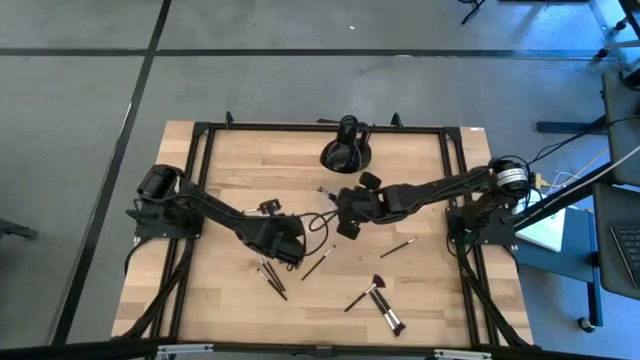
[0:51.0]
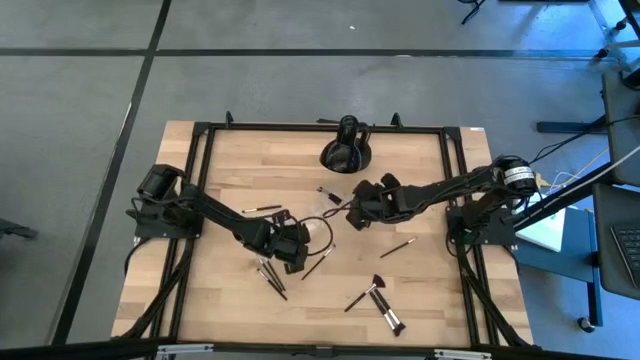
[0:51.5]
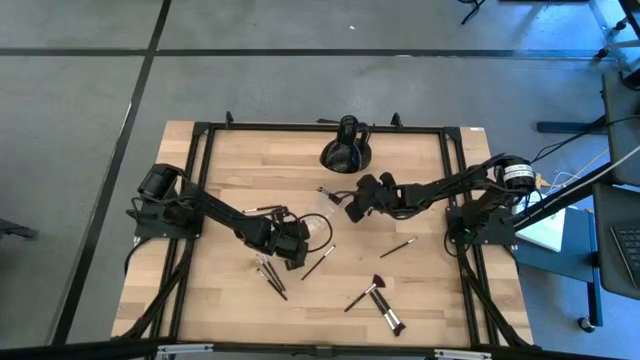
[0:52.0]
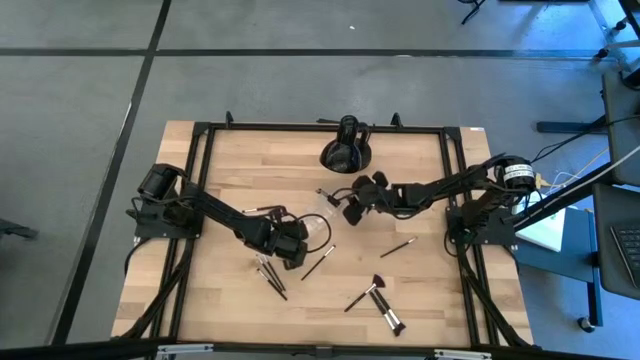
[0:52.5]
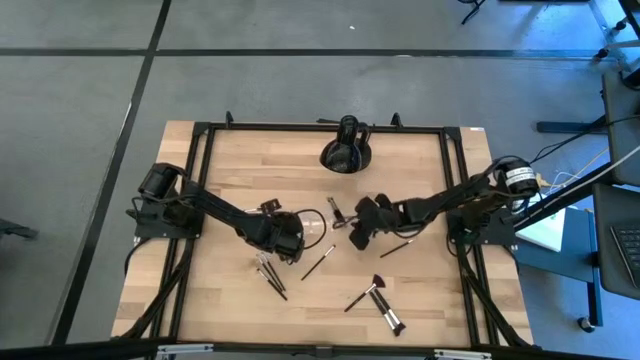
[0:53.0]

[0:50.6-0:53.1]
Task: Pick & Place Makeup Supplies
Adjust the transparent organizer

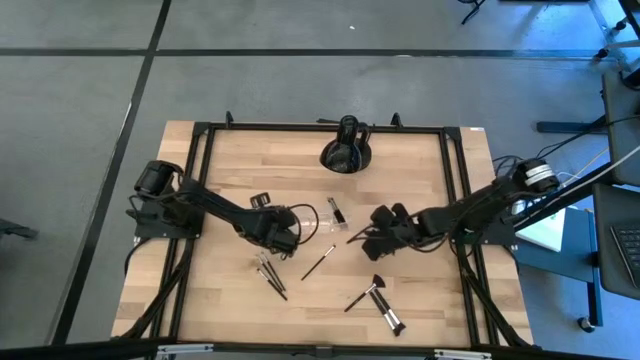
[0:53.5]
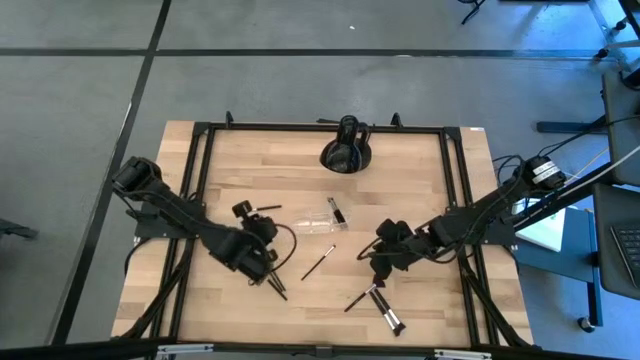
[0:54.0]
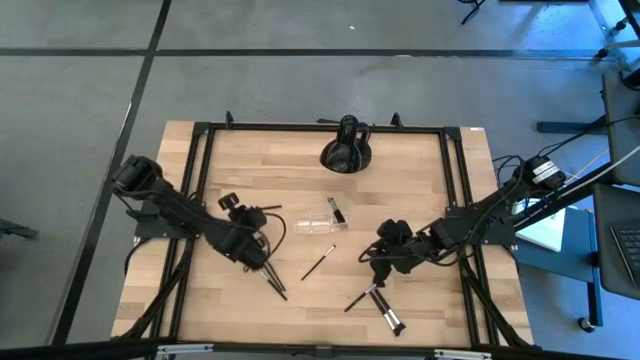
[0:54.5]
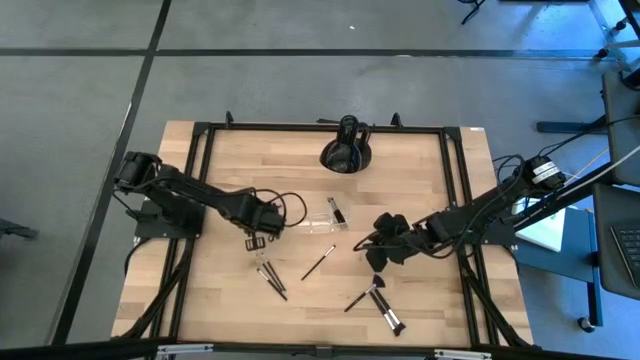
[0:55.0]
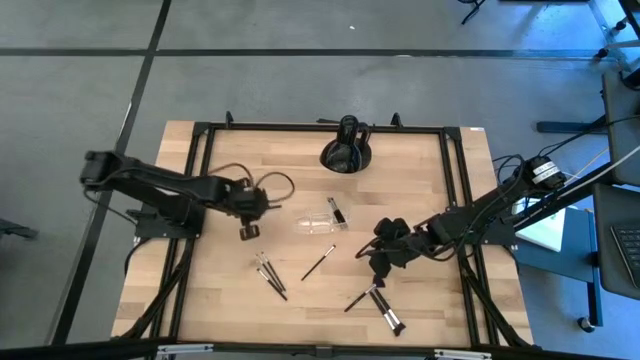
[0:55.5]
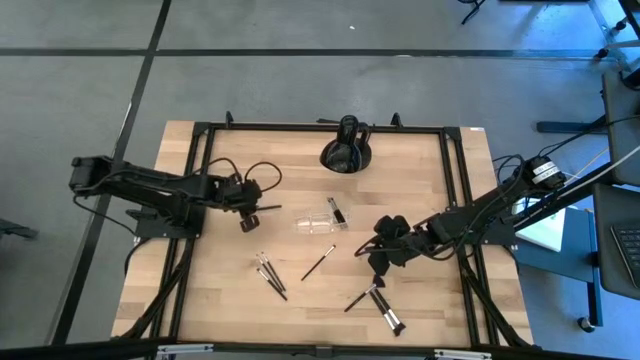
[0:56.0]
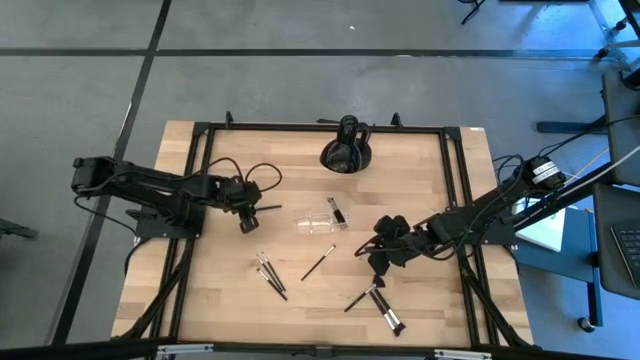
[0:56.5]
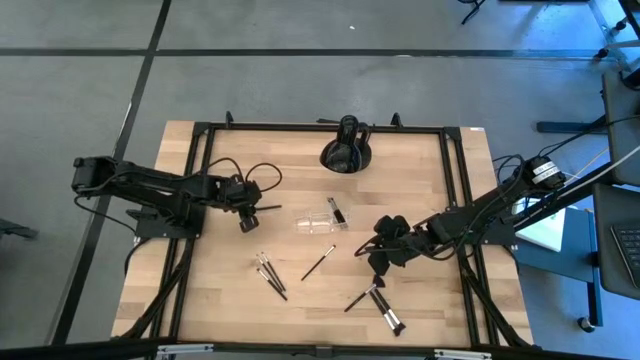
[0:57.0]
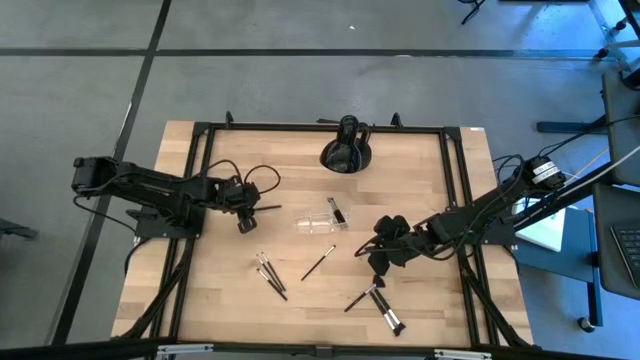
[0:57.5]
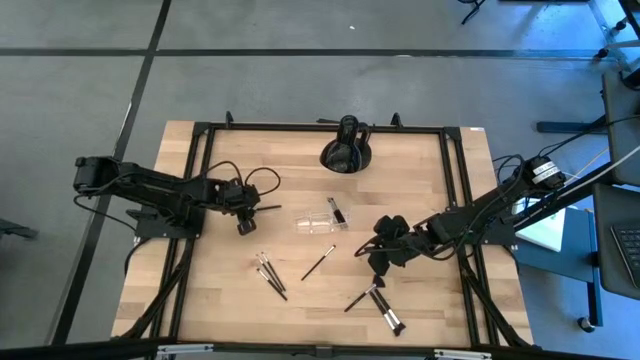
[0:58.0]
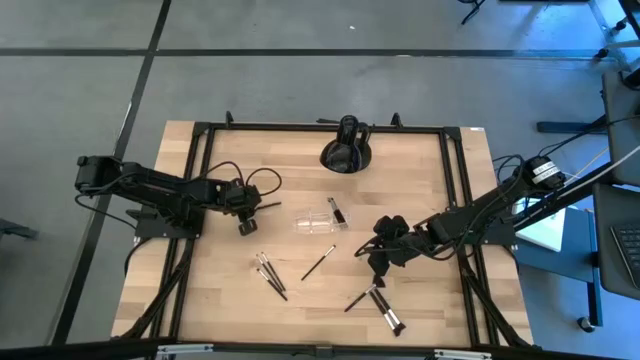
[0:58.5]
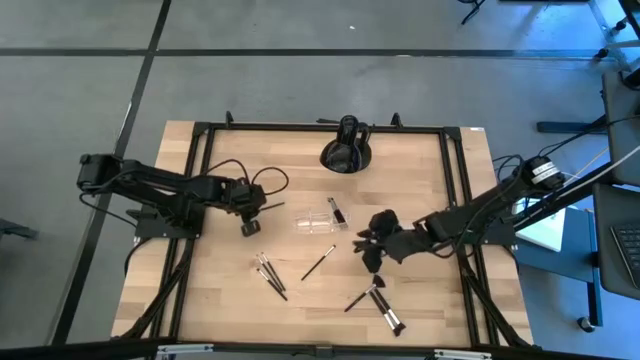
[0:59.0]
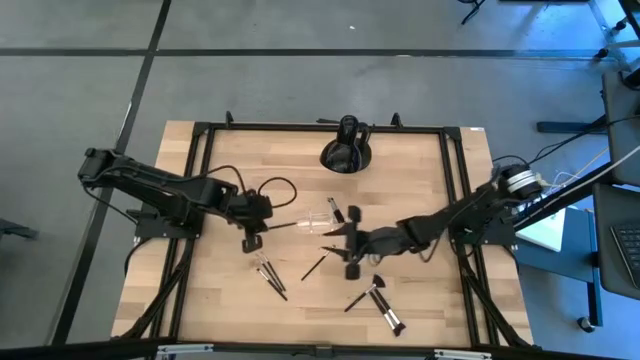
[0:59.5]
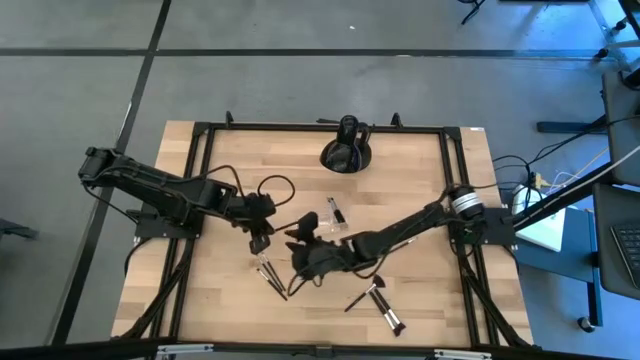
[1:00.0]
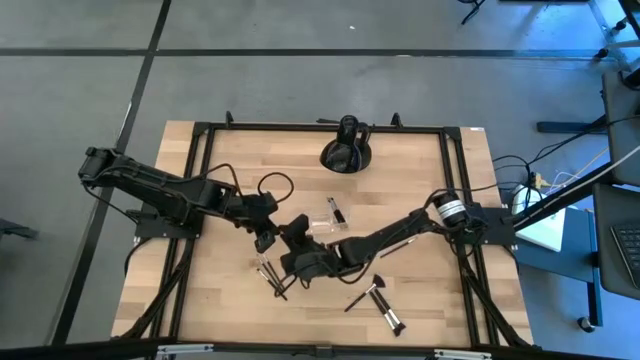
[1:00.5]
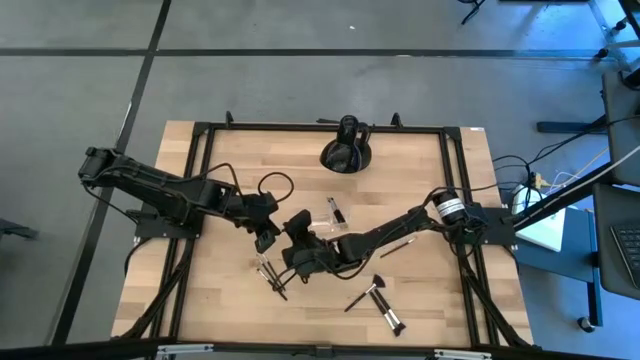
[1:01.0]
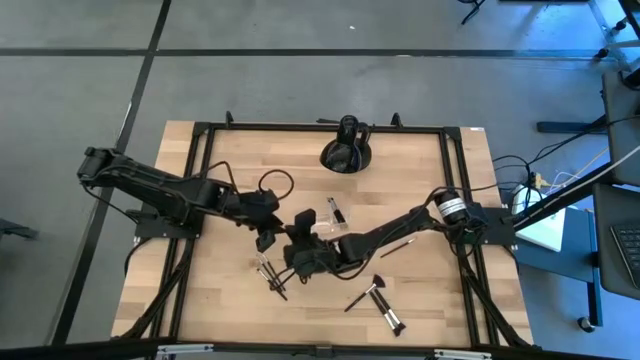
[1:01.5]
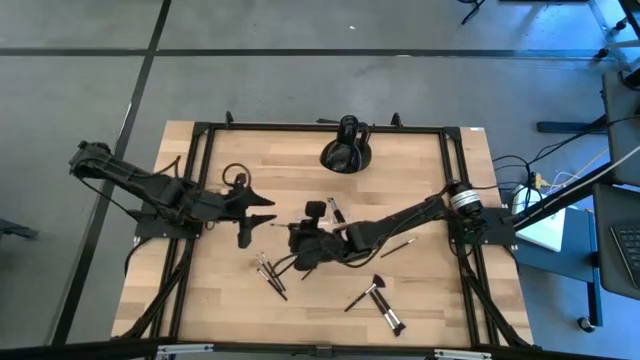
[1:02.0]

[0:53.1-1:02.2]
Put the makeup brush into the transparent organizer

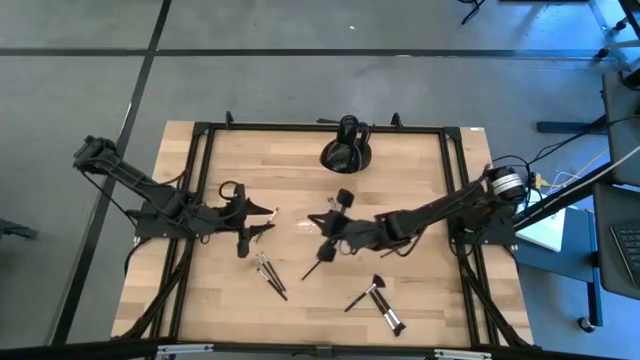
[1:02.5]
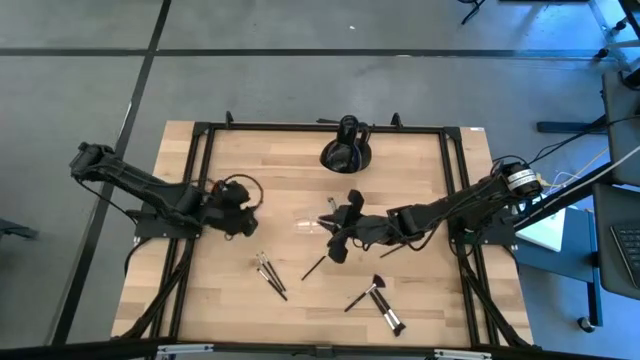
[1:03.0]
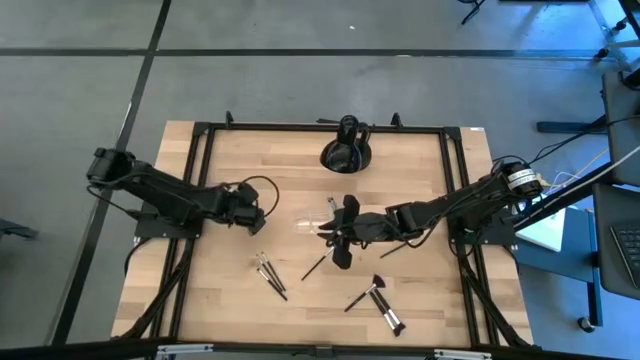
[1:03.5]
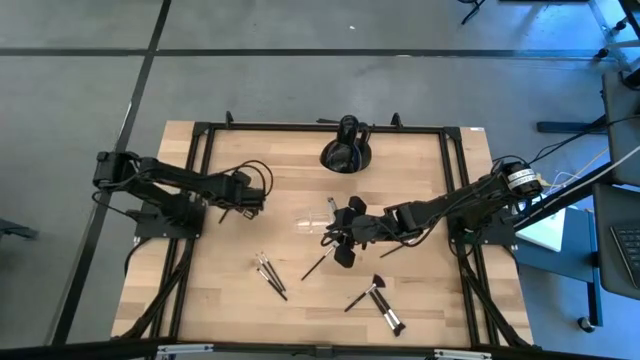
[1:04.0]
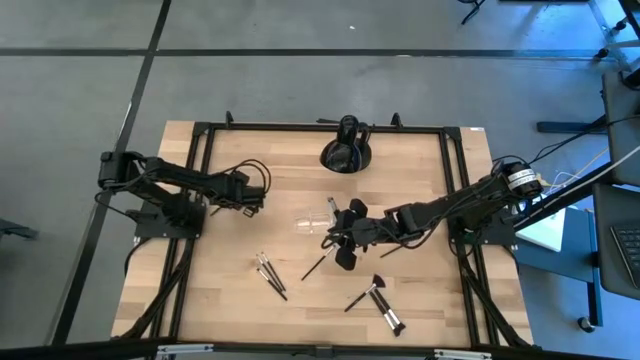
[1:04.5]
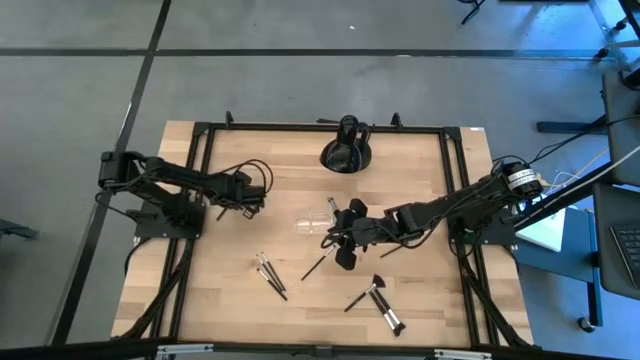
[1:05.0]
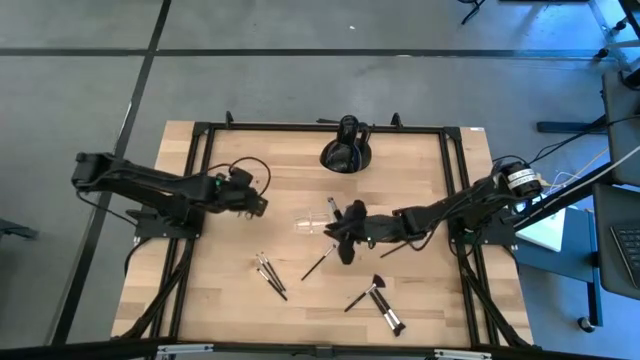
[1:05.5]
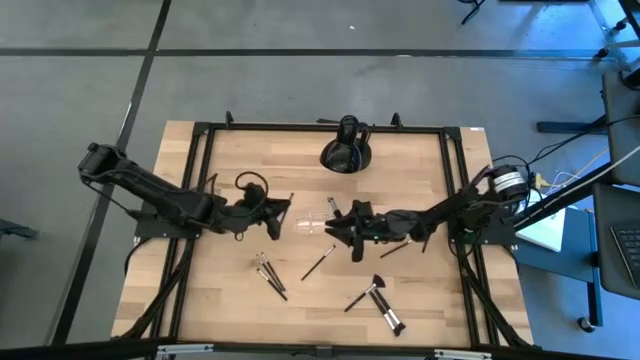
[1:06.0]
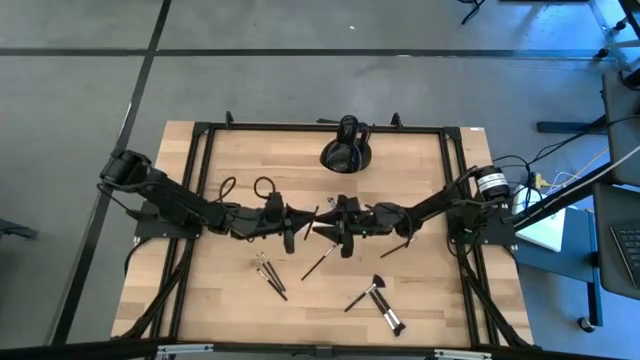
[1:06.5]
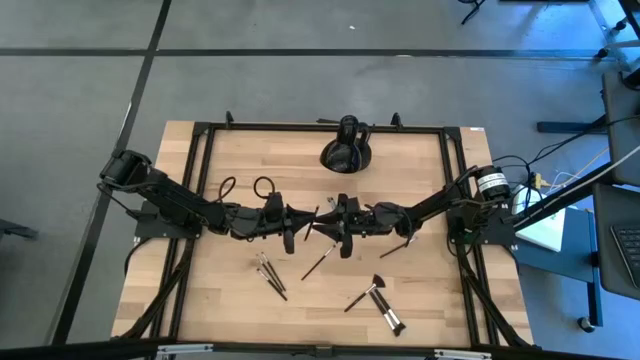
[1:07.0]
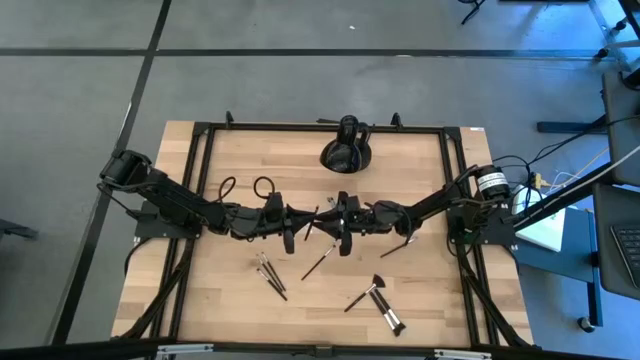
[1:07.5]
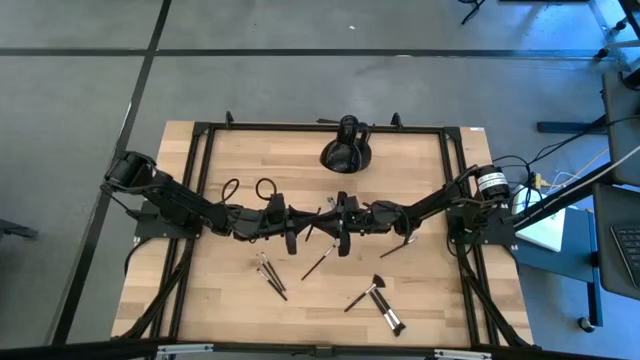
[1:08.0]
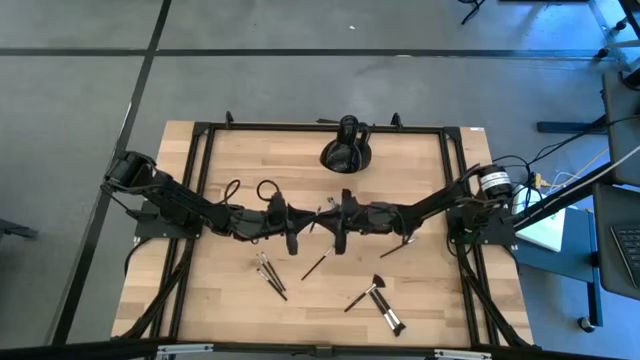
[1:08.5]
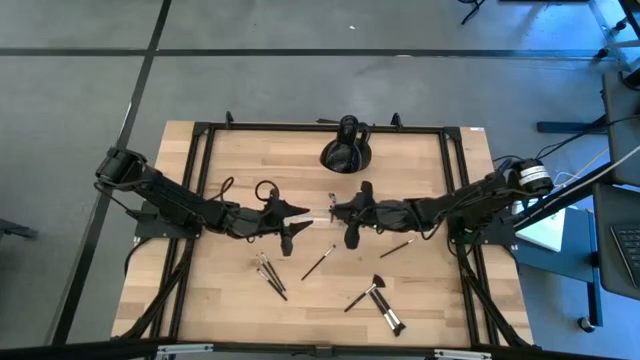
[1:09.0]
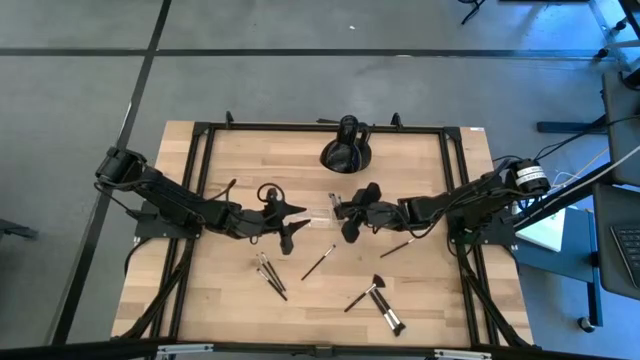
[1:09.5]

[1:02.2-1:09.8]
Put the makeup brush into the transparent organizer

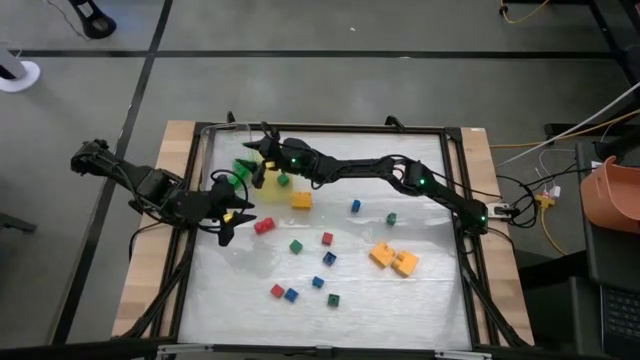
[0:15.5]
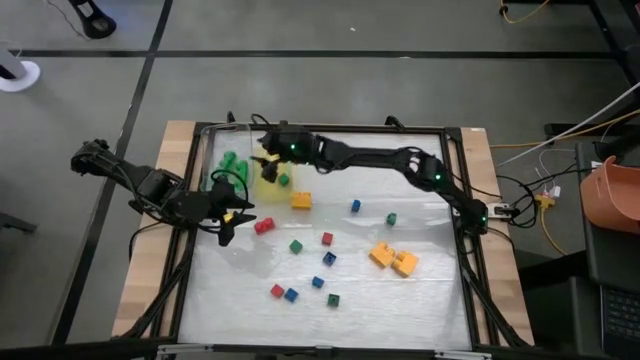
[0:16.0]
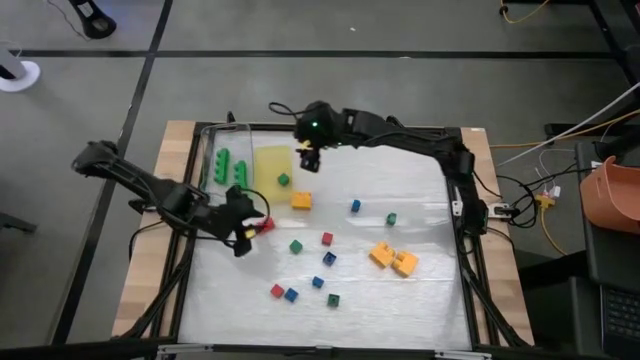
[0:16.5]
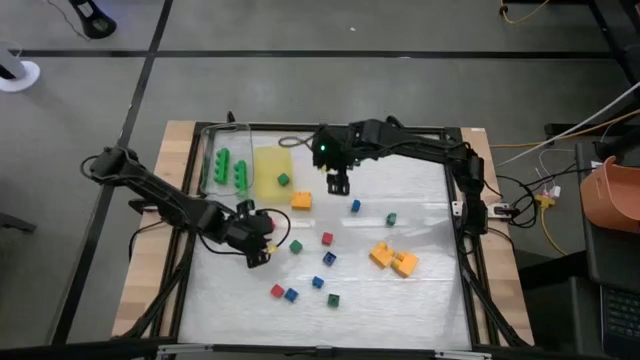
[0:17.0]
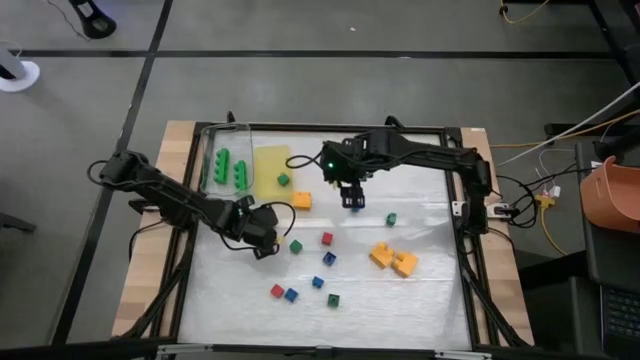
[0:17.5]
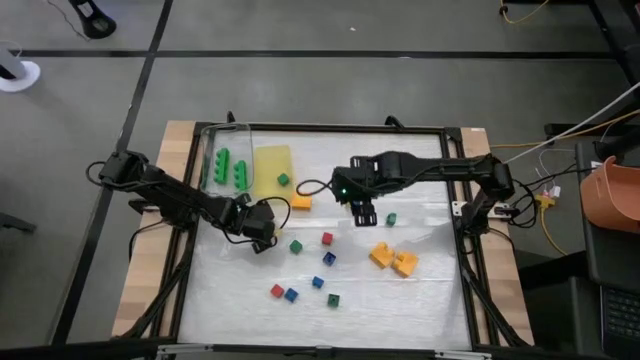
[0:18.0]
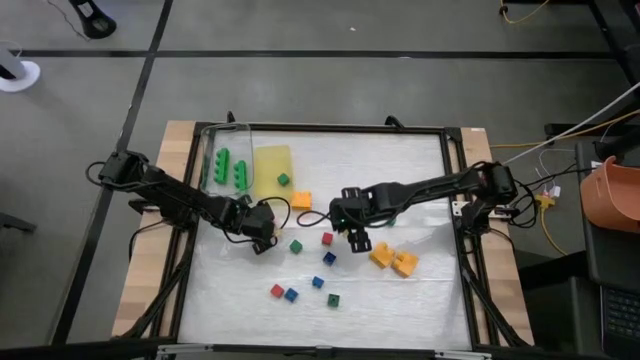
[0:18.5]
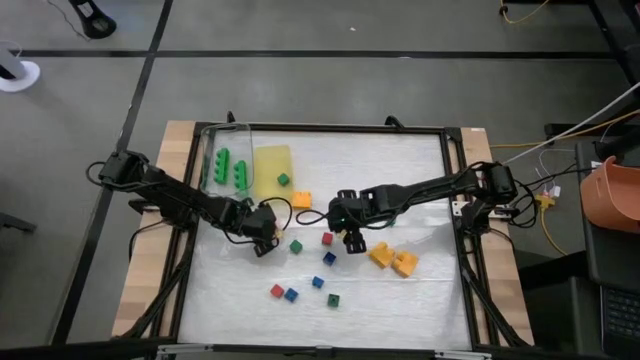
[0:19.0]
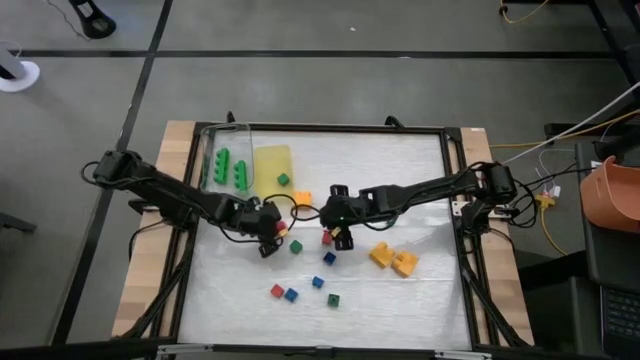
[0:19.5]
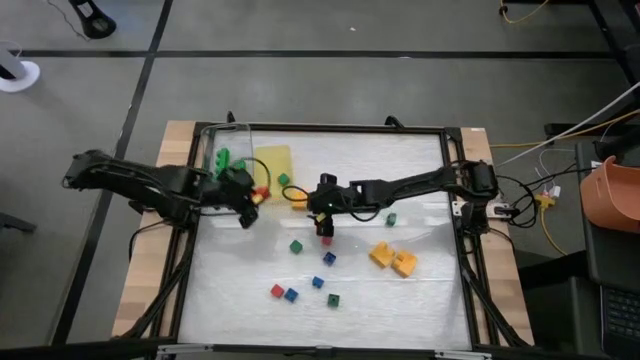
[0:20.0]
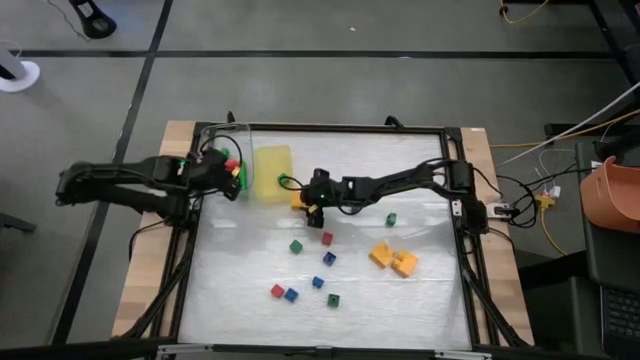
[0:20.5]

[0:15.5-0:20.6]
Task: Sort blocks by size
Put the large red game piece into the transparent bin
